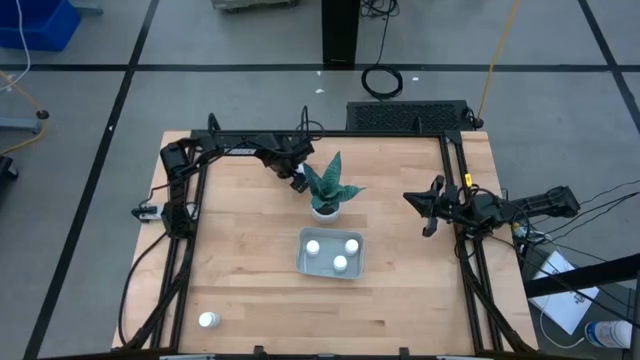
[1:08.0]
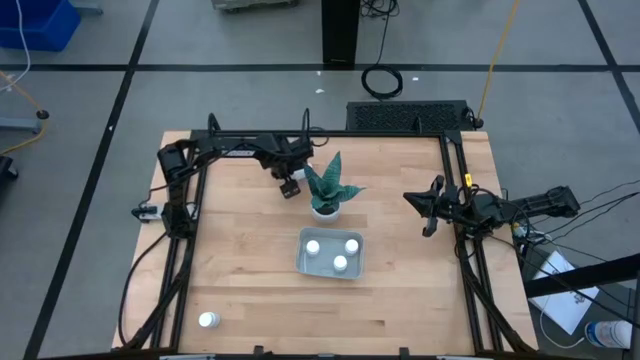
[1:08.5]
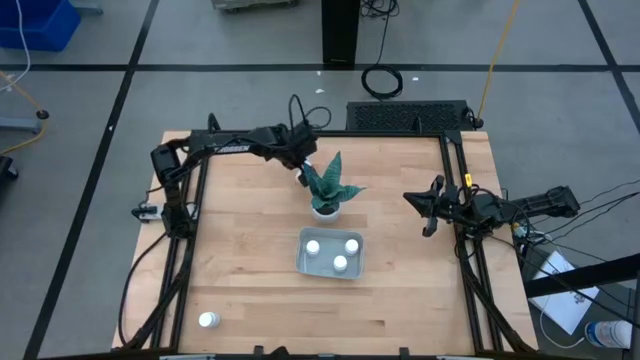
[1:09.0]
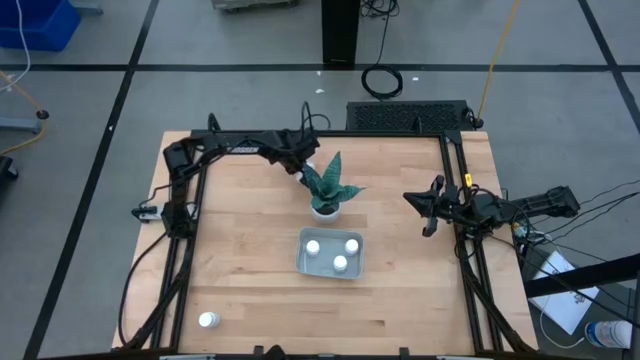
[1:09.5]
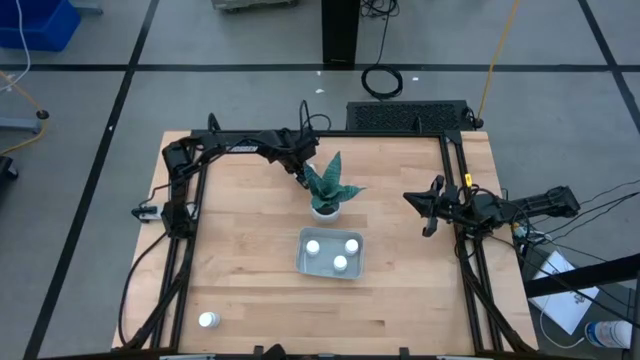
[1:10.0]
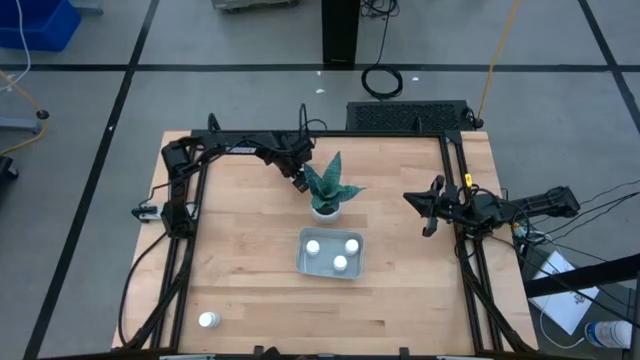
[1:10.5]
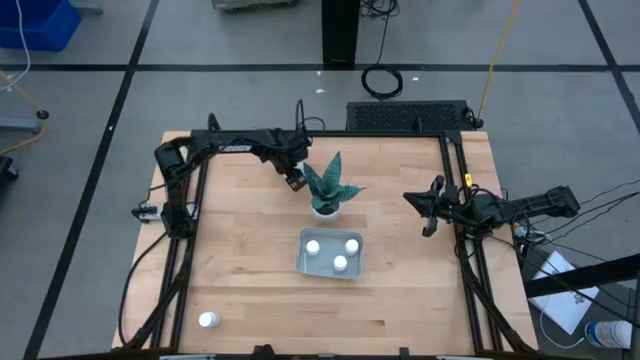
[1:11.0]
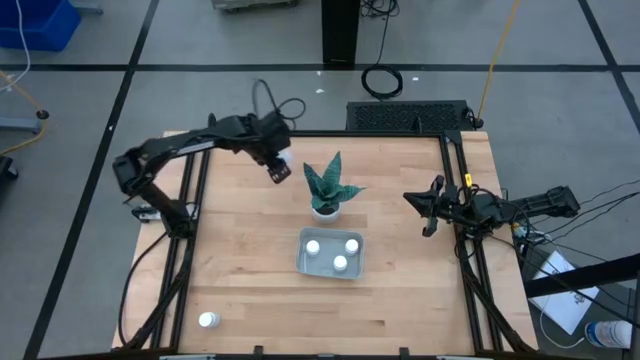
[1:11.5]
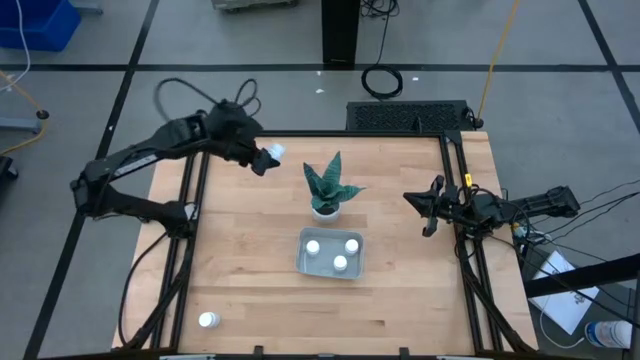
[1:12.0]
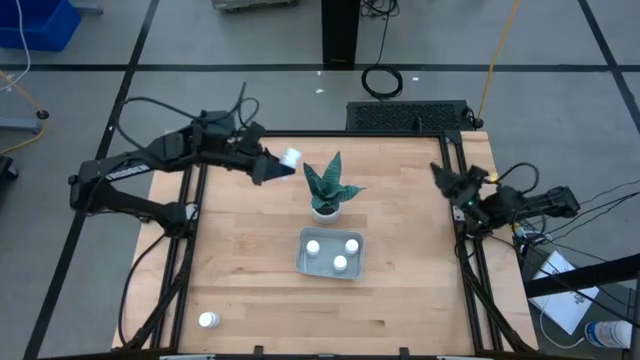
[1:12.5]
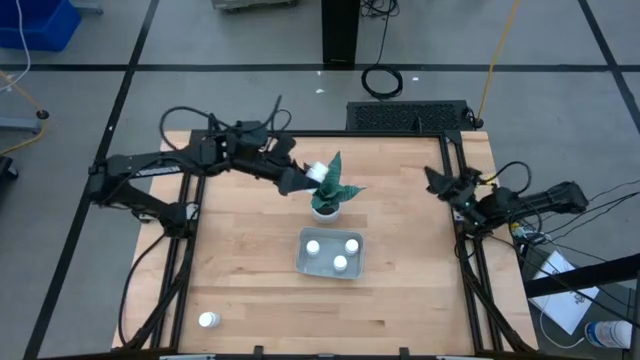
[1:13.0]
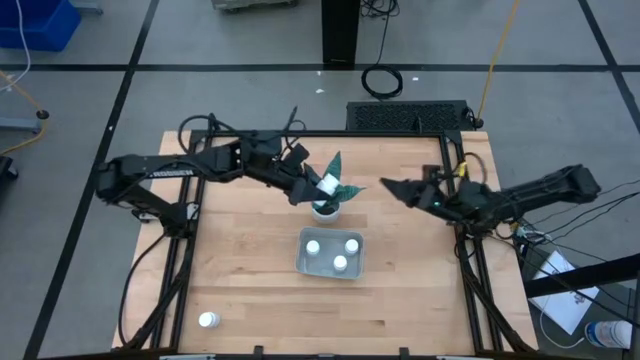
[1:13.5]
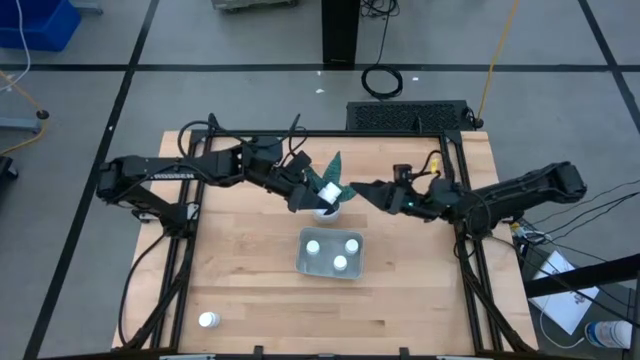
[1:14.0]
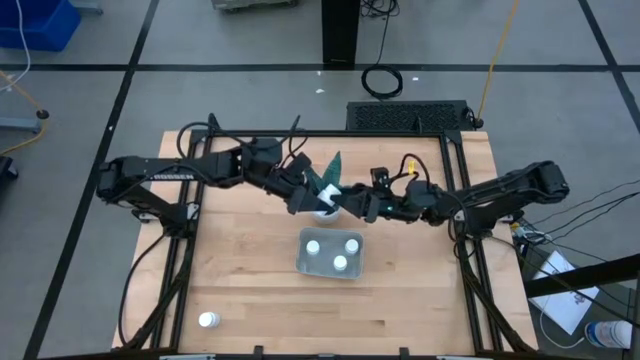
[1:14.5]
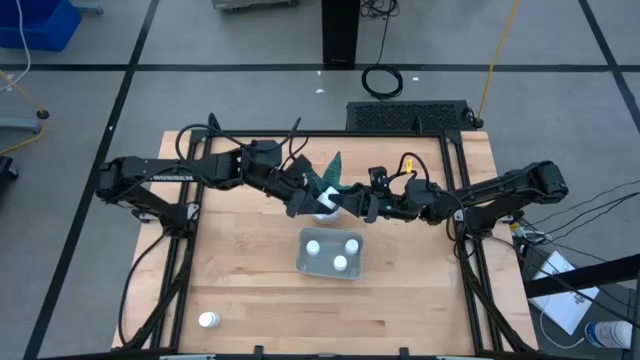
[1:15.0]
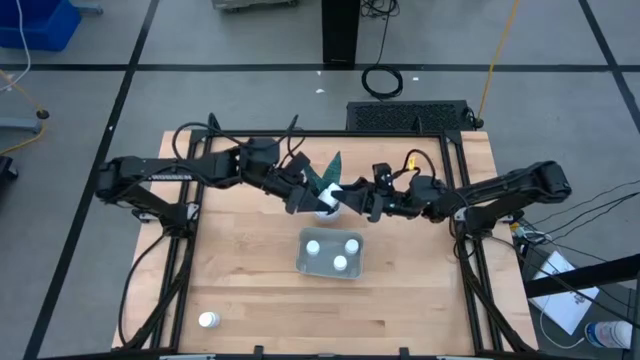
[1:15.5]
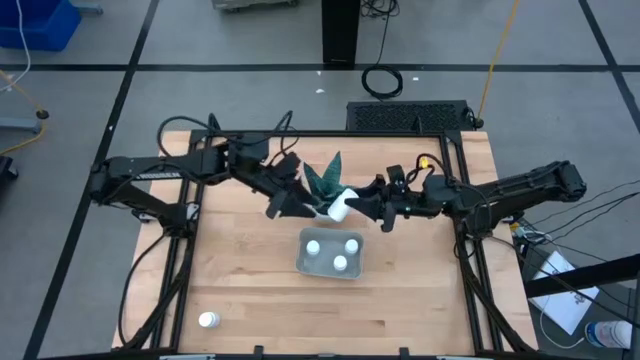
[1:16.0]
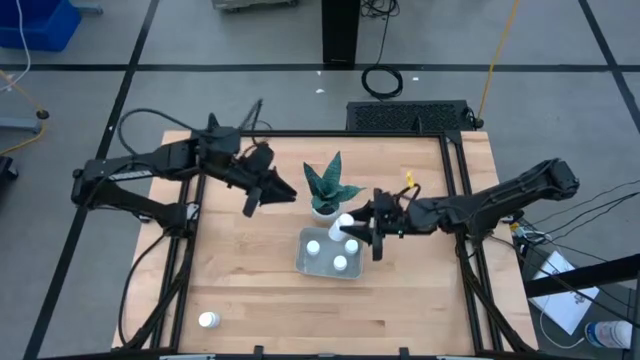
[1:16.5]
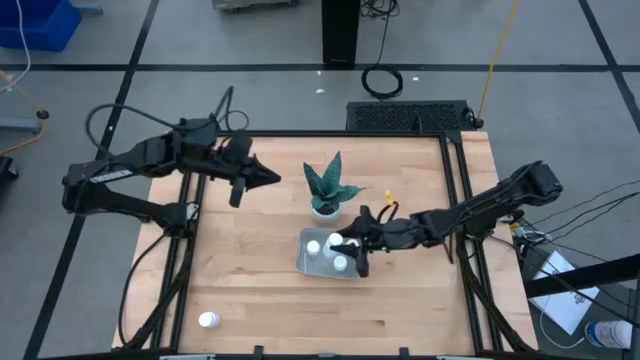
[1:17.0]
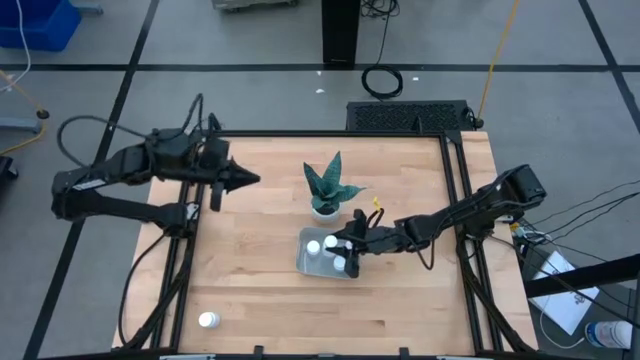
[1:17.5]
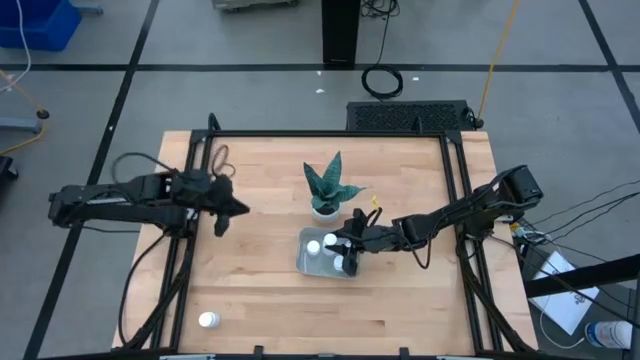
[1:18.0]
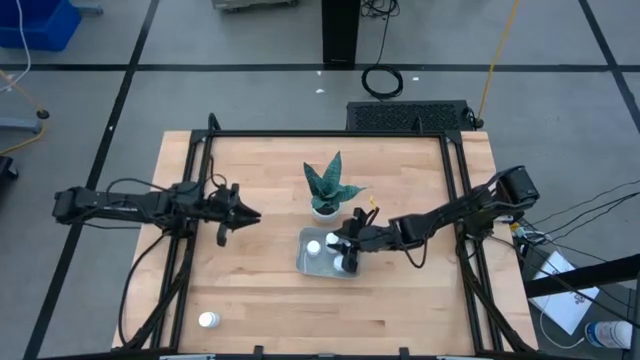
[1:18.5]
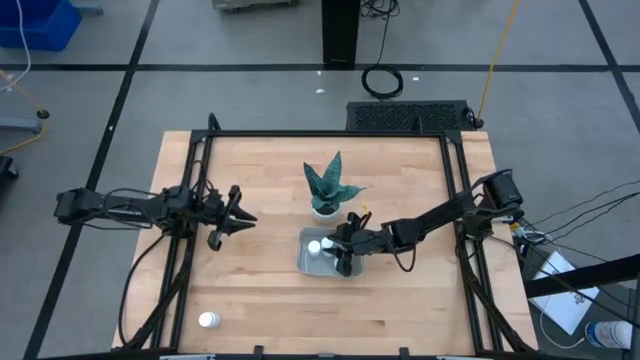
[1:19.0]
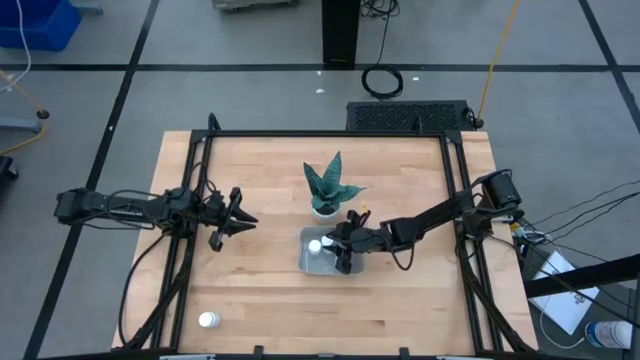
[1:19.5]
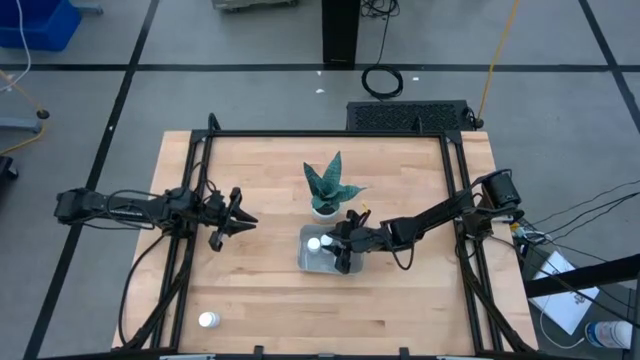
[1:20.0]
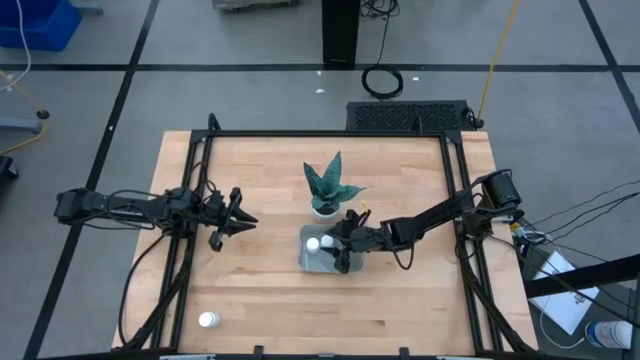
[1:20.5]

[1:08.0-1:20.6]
Task: Pick and place pill bottles into a basket
Put the white pill bottle into the gray bin

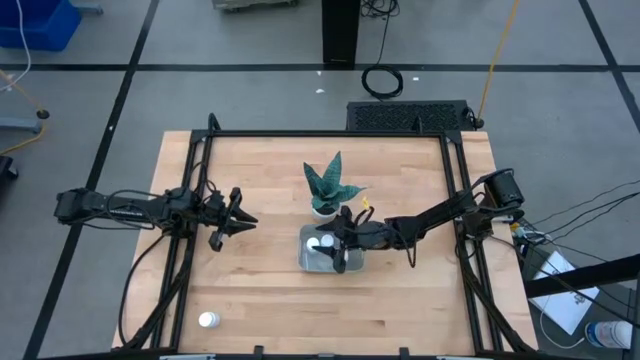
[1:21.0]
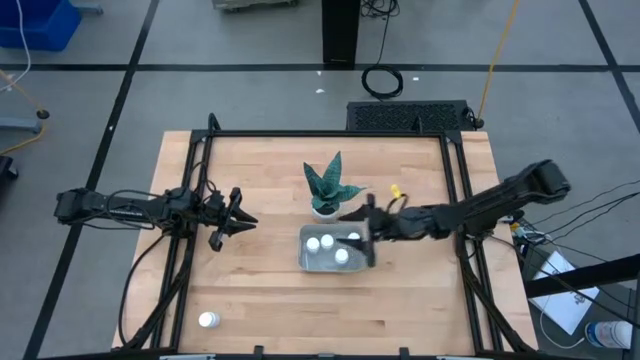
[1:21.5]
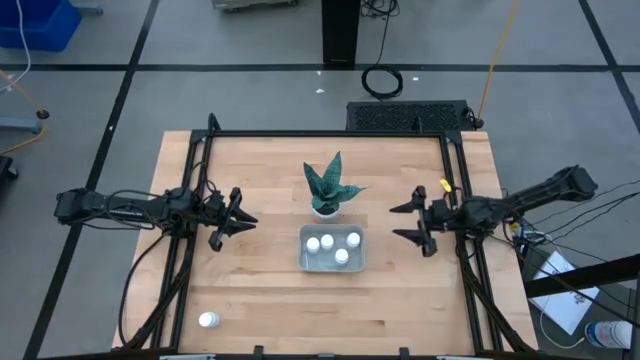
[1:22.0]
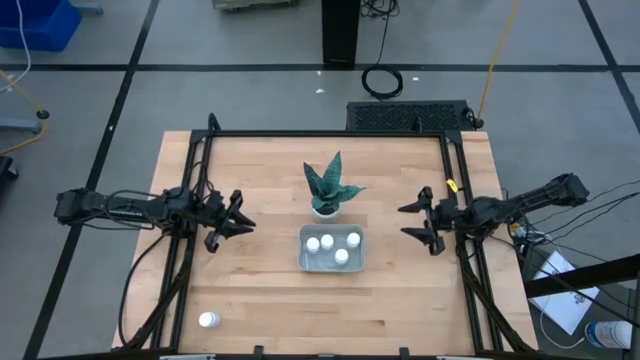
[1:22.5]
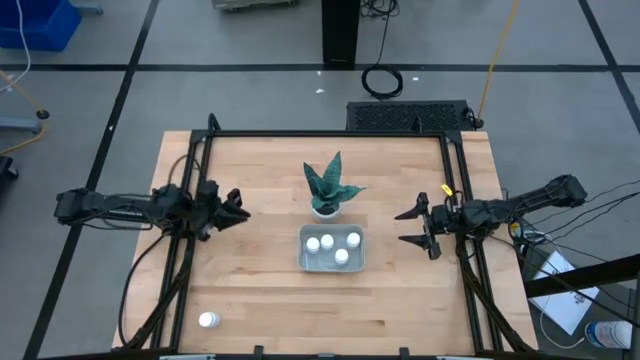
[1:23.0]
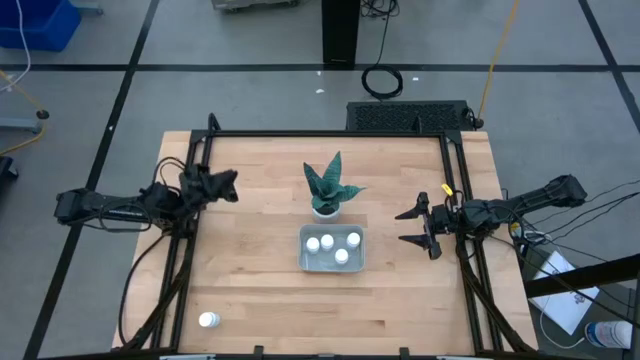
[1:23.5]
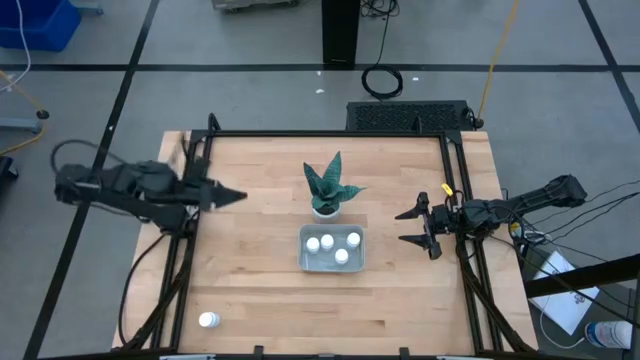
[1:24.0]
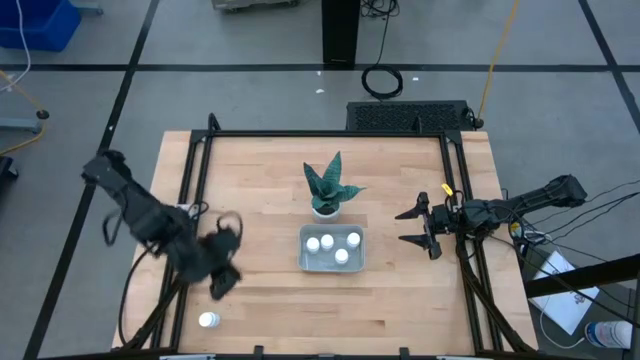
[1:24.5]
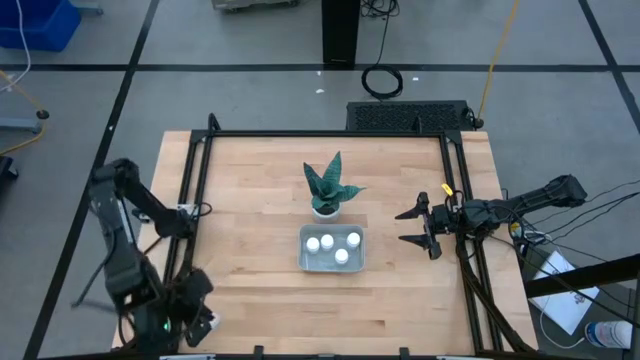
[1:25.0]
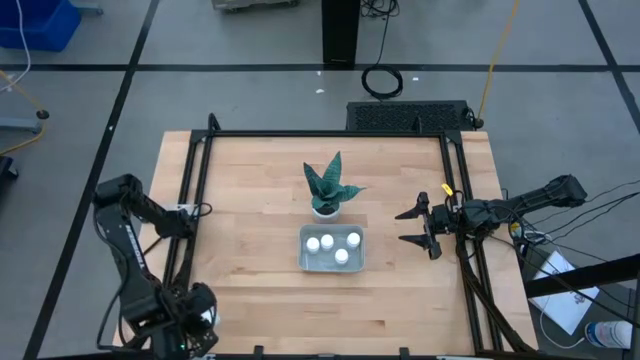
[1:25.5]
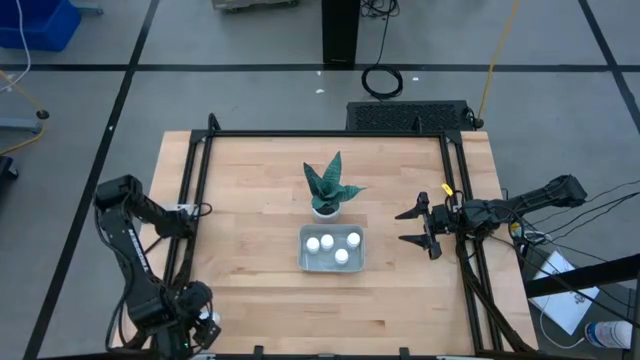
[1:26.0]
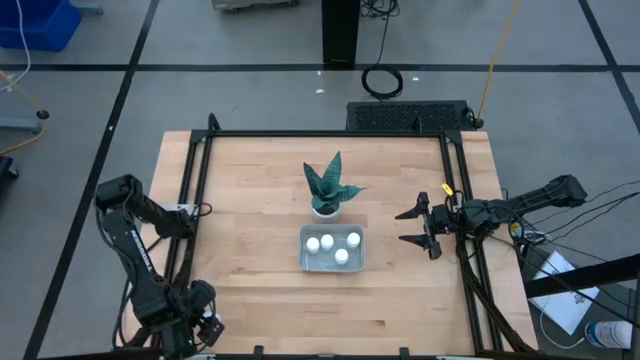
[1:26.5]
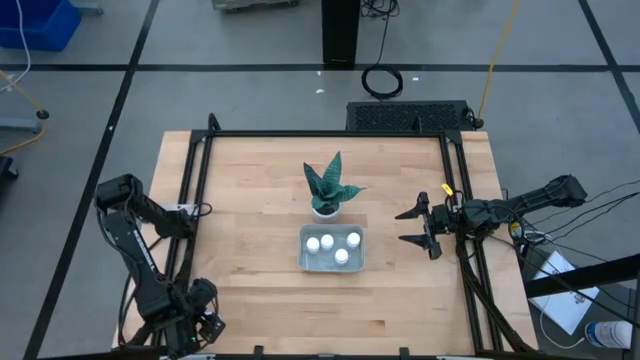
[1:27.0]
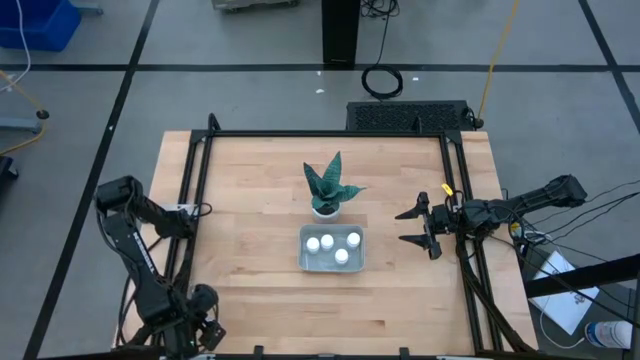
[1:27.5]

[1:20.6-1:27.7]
Put the white pill bottle into the gray bin

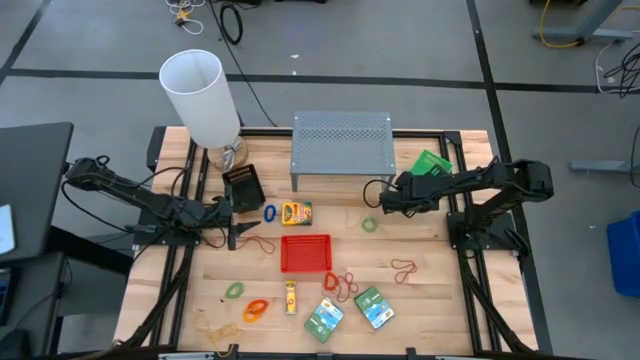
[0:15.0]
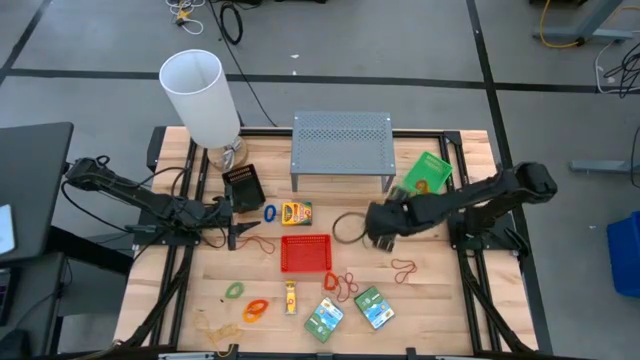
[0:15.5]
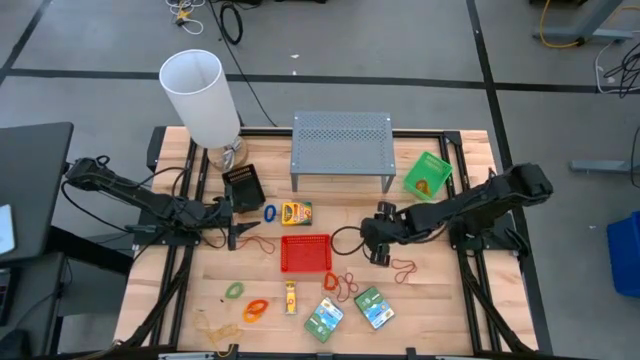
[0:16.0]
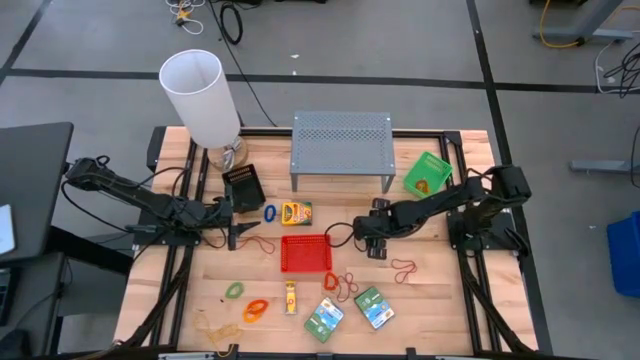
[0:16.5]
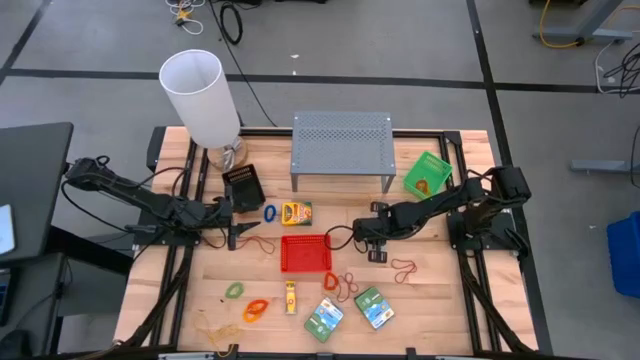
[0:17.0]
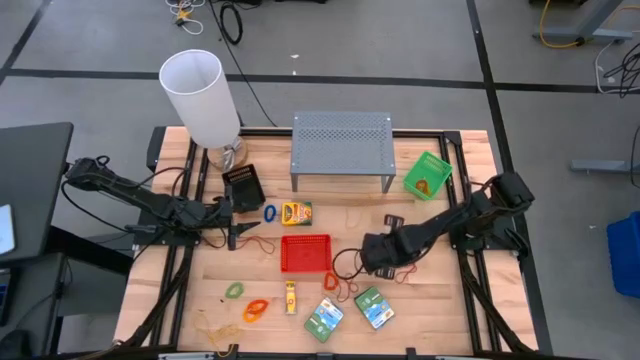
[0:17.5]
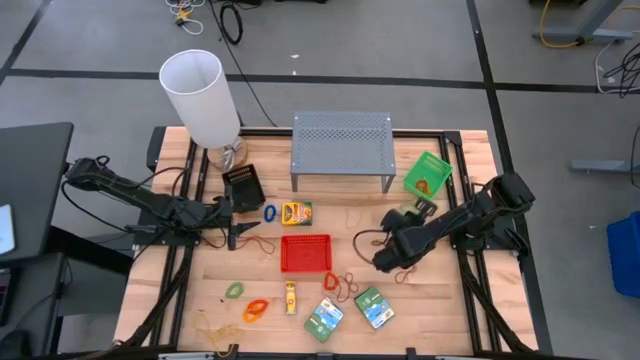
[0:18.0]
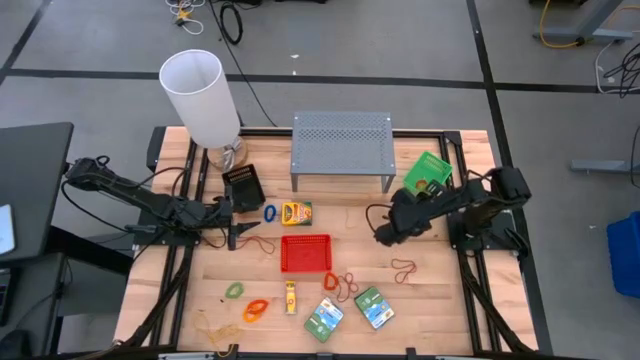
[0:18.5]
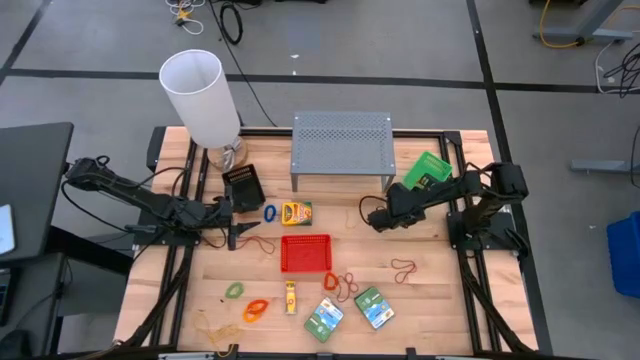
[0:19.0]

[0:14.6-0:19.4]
Task: Pick & Place Office Desk Supplies
Put the green spring keychain into the green bin
